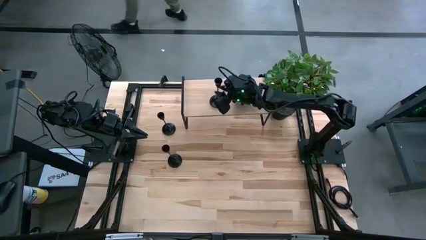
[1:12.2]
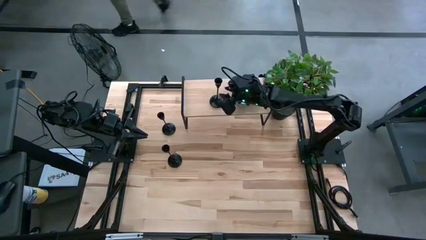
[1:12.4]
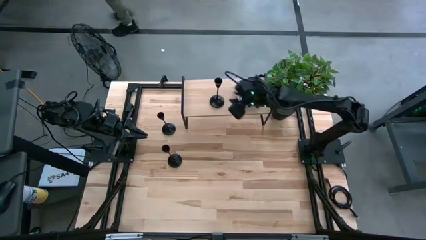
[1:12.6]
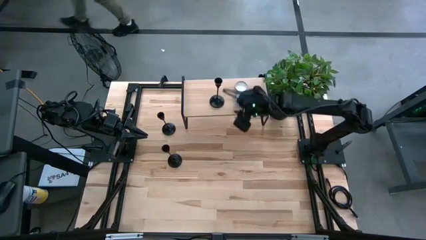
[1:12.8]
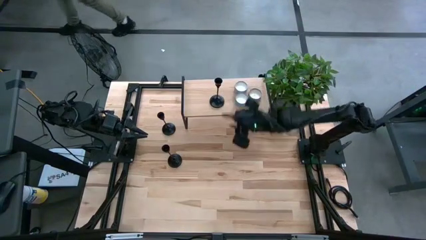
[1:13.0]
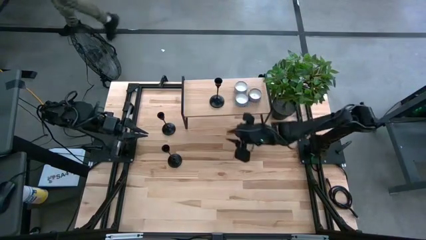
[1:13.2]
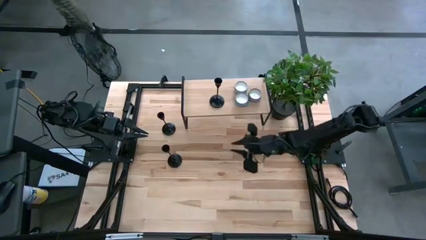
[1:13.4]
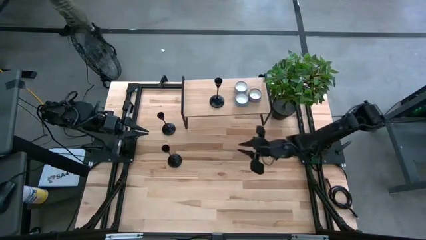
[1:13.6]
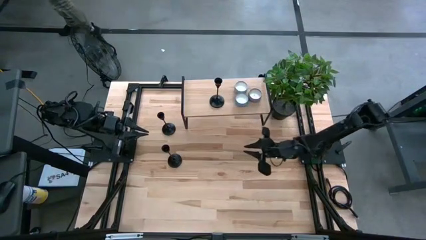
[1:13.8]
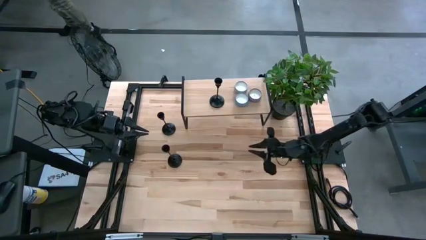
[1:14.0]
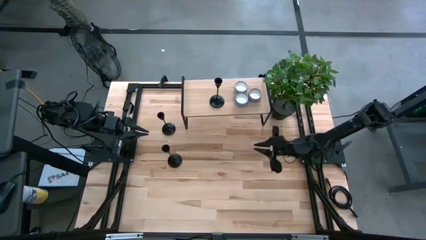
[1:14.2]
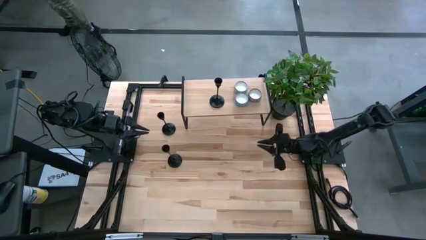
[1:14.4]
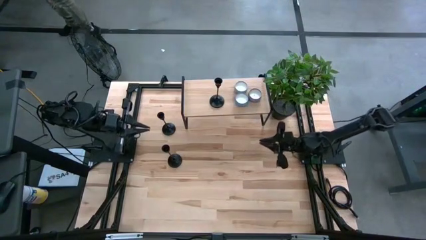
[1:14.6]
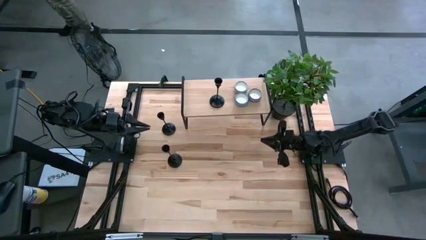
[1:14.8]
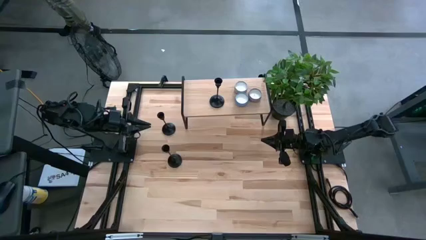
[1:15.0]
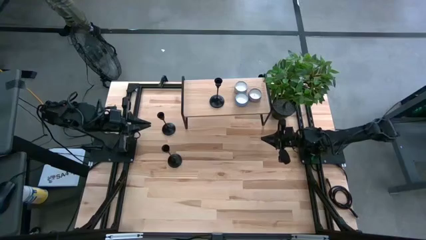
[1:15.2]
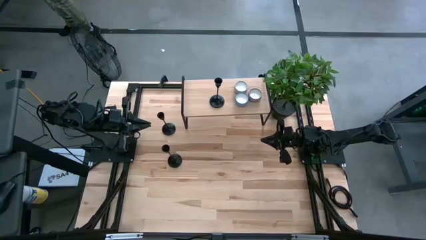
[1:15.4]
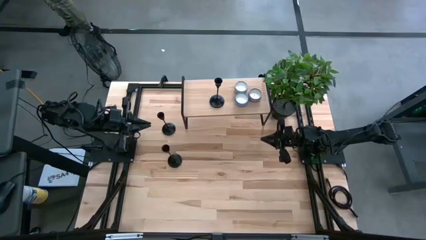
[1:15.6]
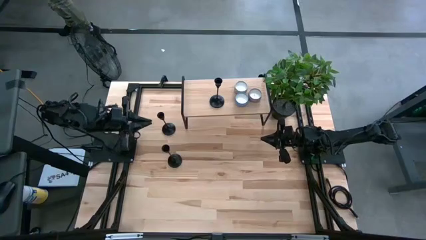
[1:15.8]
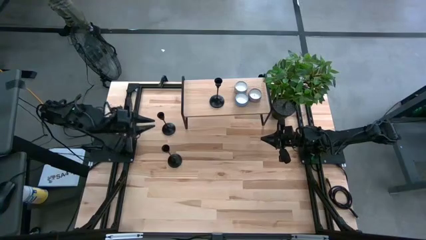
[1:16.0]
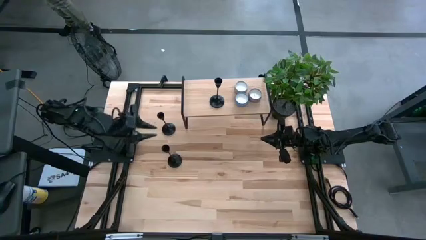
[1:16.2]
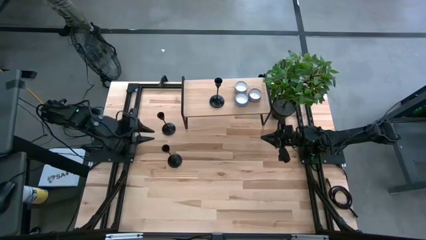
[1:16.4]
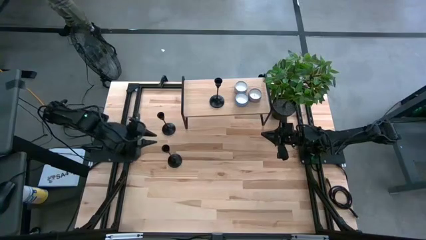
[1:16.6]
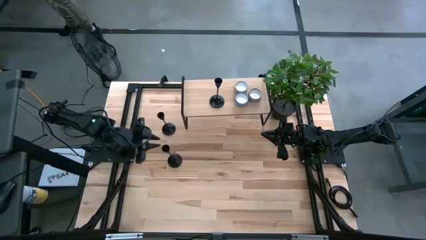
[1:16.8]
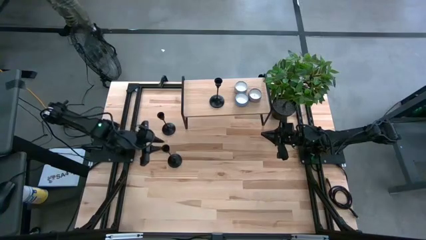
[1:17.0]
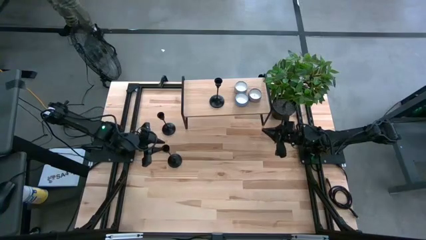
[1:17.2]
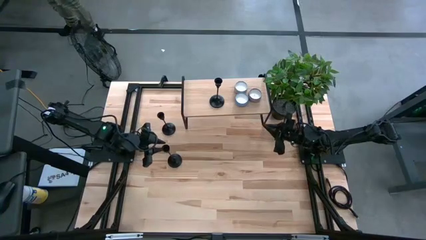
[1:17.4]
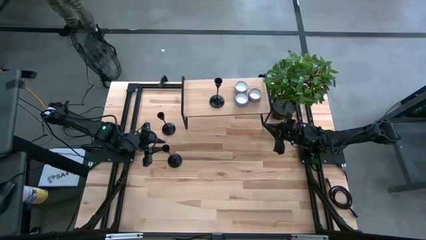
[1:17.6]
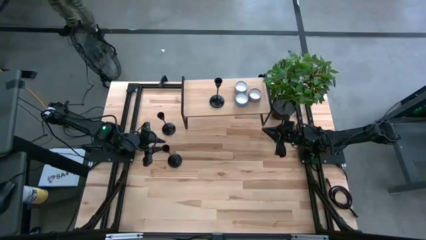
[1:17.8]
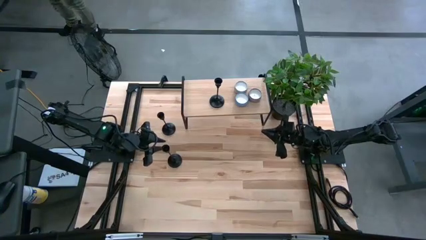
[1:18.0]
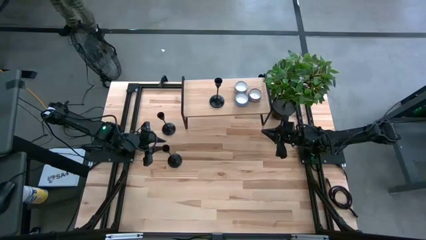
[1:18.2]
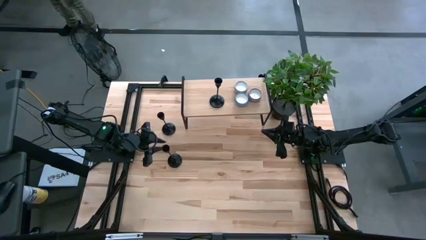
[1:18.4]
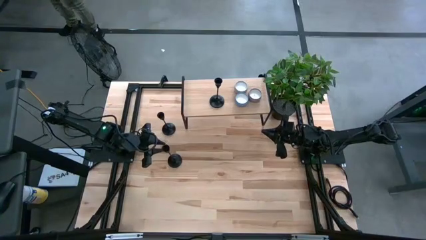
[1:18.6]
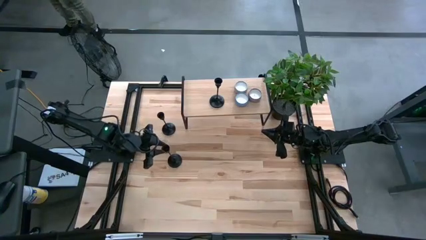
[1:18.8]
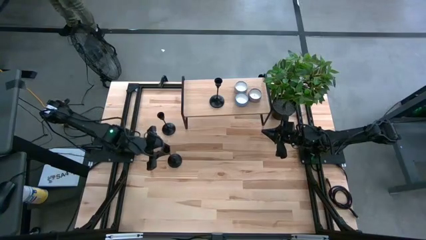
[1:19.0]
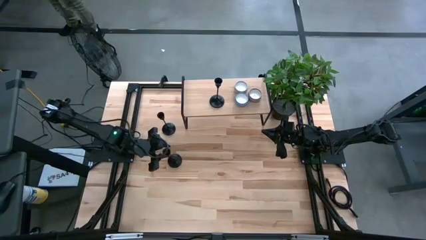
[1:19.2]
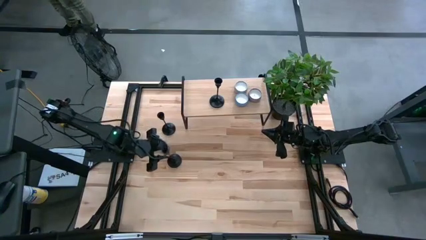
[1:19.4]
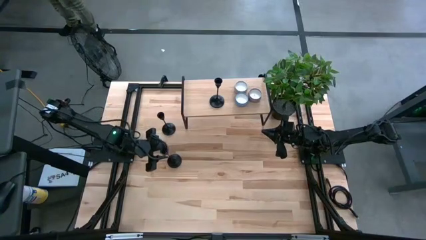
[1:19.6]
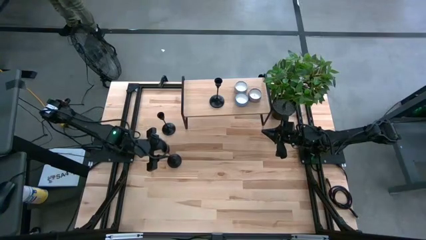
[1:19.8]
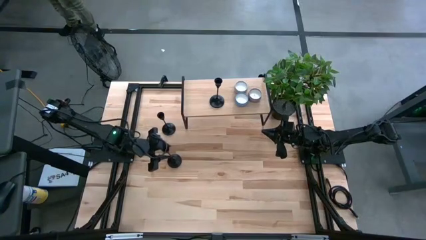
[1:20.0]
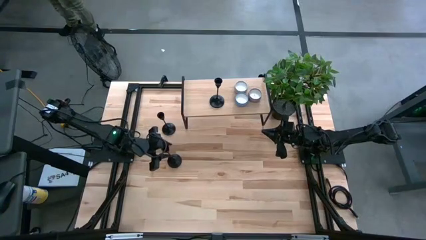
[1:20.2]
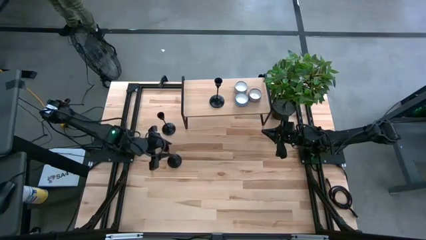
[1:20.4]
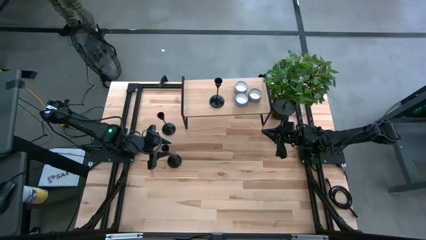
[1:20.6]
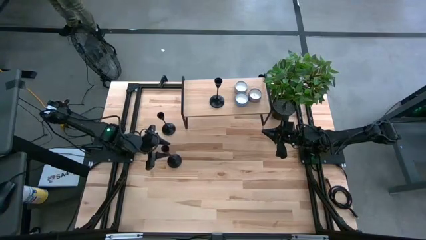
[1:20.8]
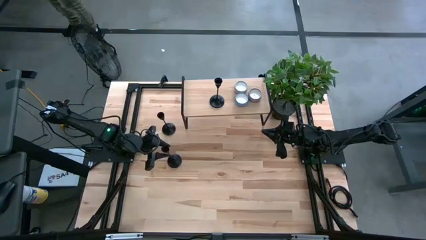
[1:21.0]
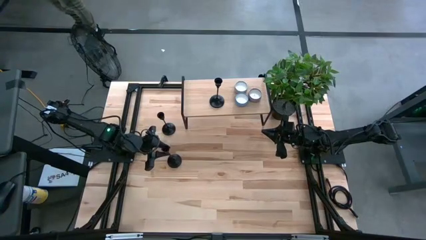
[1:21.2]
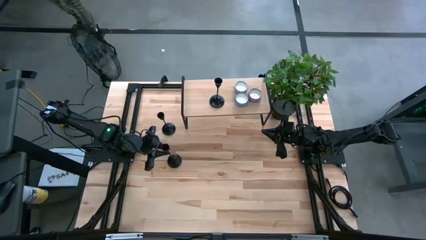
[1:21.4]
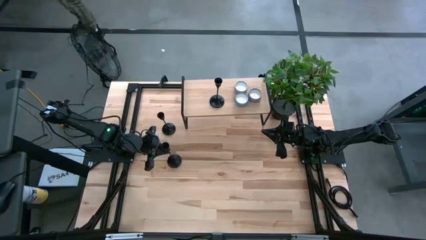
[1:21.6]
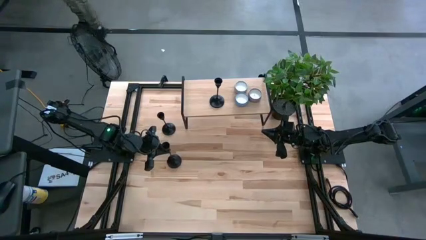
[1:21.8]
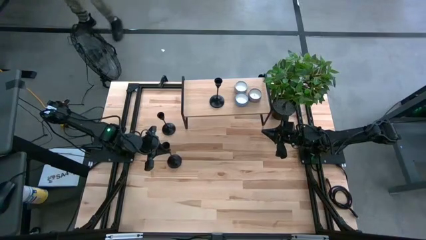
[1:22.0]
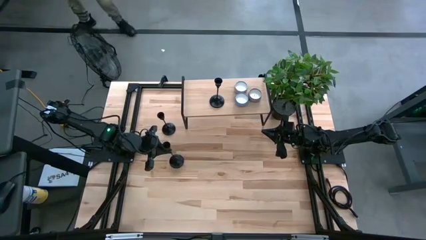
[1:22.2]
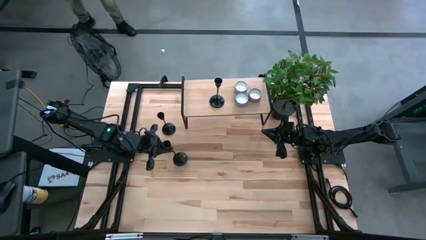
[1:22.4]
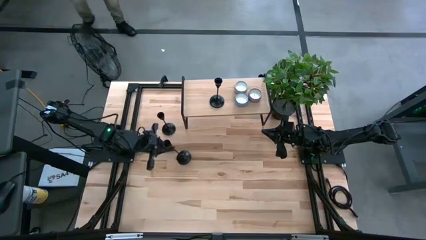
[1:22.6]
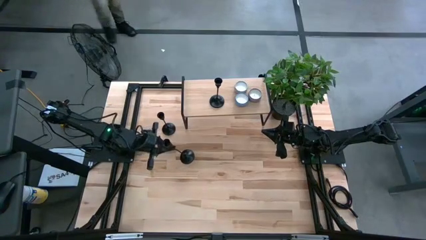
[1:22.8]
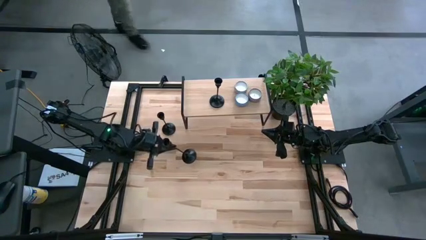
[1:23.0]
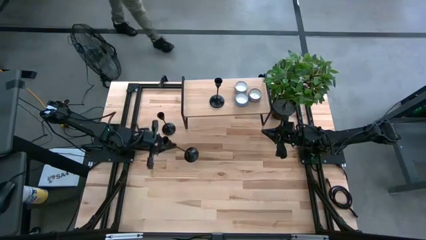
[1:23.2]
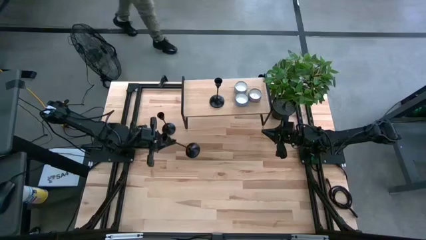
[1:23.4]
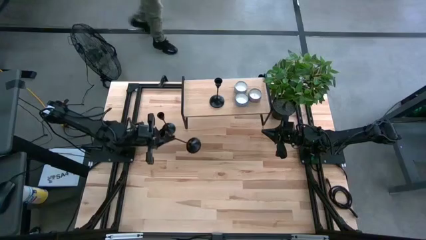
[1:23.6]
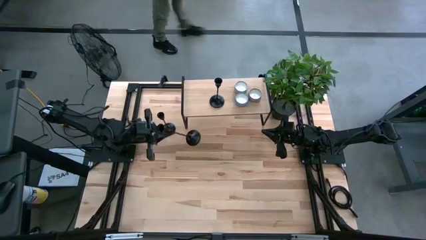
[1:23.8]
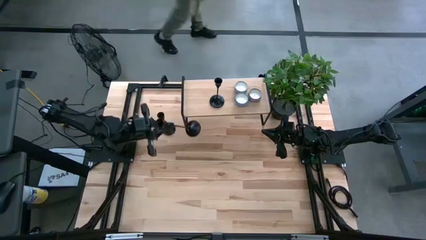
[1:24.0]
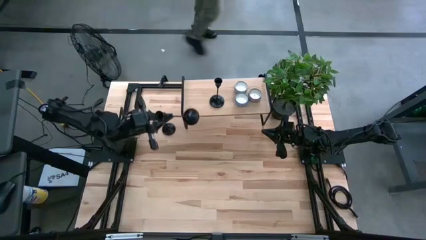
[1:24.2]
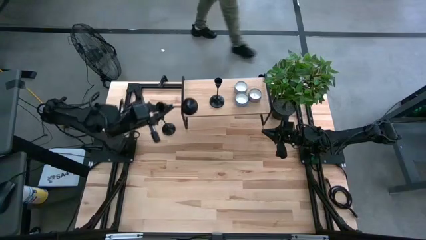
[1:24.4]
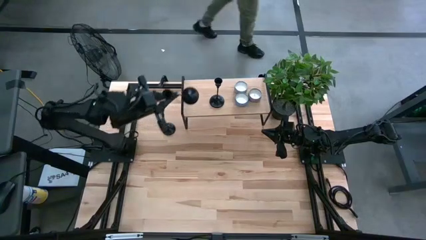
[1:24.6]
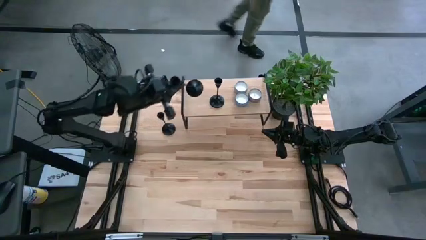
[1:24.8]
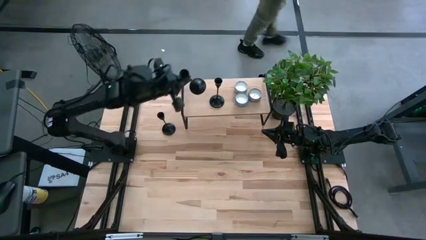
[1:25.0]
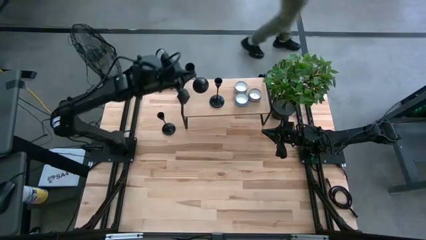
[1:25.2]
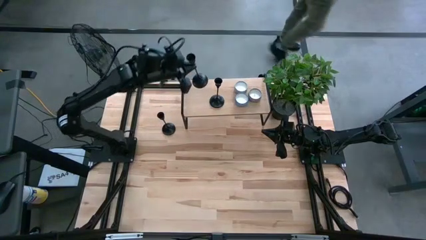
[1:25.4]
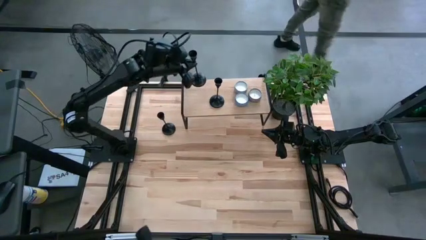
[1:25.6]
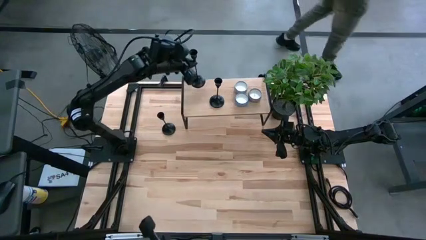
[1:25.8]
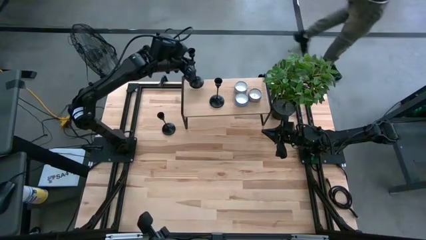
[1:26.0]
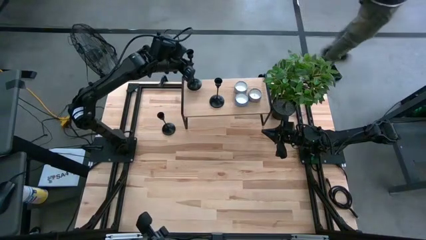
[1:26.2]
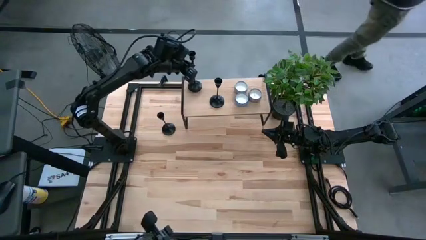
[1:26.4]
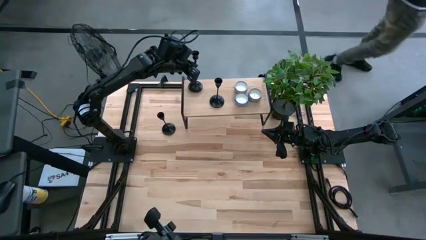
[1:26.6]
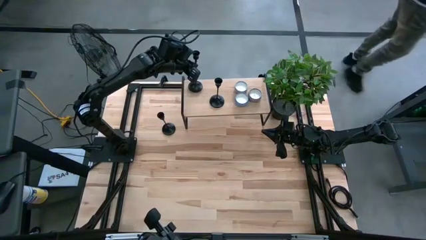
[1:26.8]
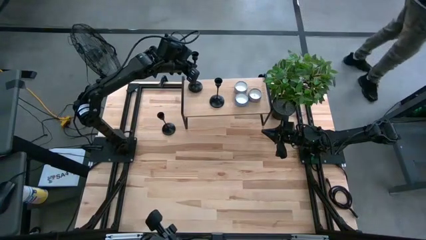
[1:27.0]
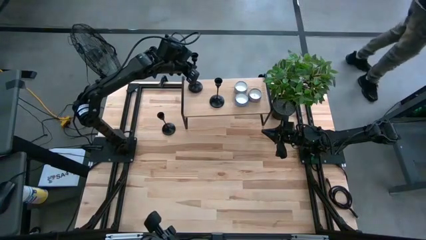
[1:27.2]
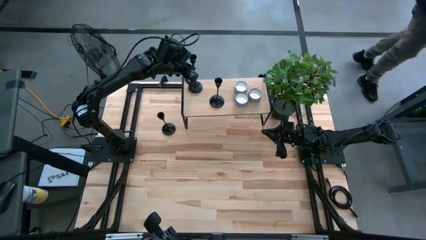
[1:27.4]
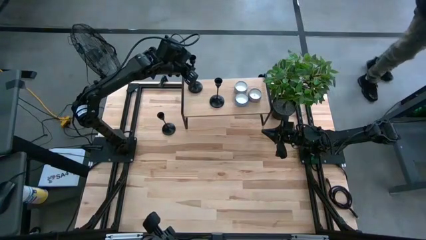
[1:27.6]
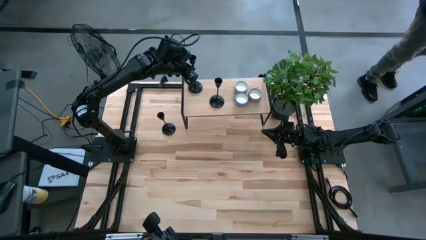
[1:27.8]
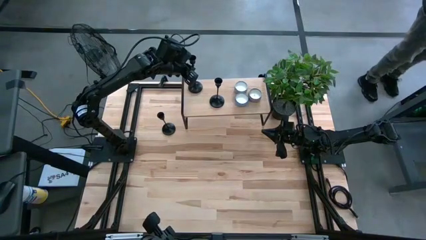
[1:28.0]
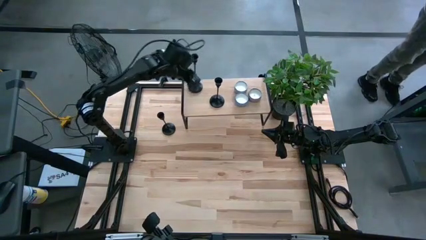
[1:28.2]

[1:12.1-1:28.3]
Task: Pick & Place candle stick holders
Put the black candle holder on the shelf
